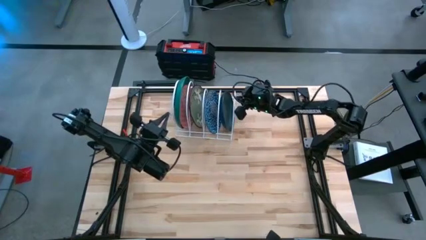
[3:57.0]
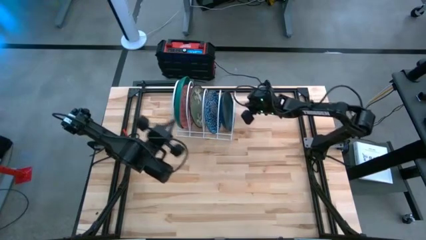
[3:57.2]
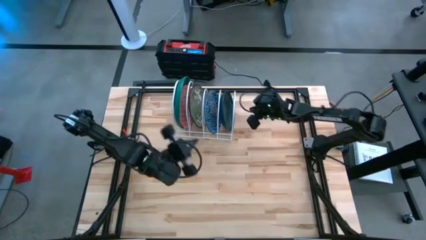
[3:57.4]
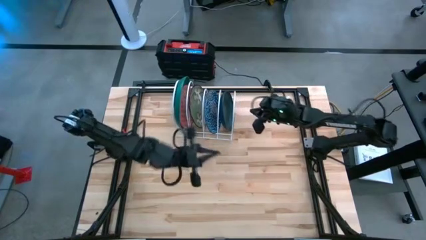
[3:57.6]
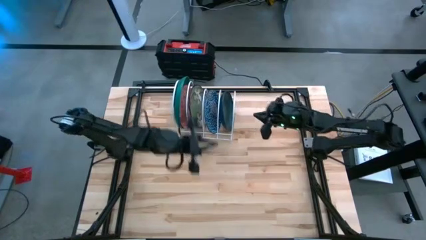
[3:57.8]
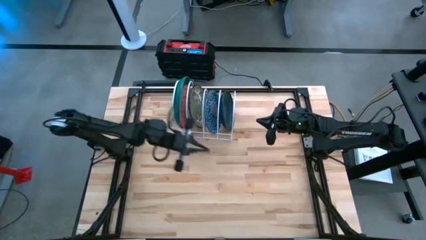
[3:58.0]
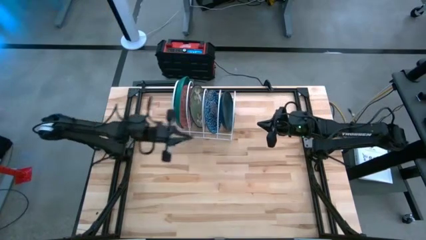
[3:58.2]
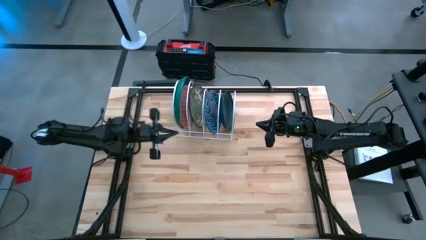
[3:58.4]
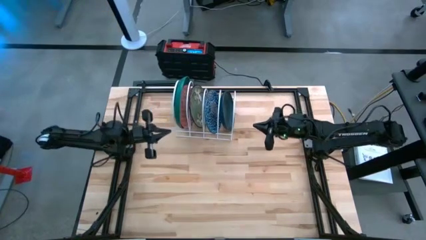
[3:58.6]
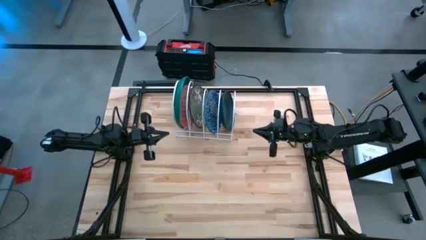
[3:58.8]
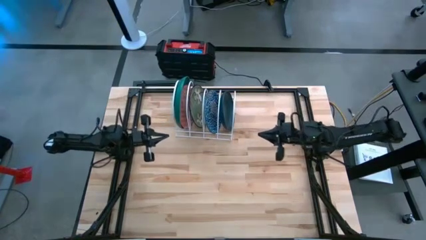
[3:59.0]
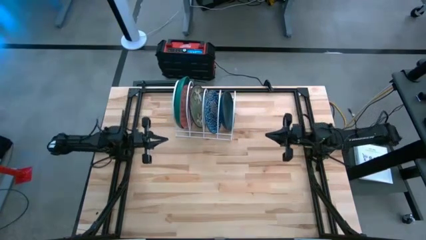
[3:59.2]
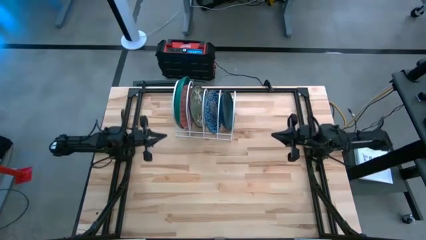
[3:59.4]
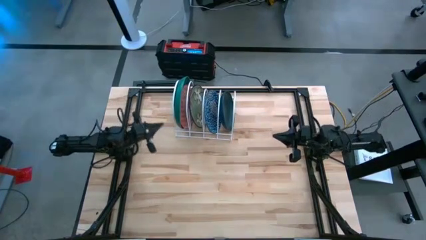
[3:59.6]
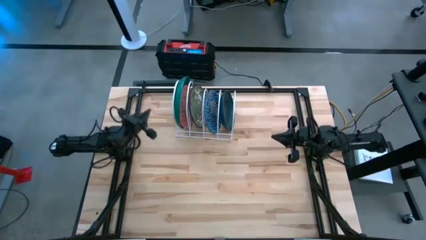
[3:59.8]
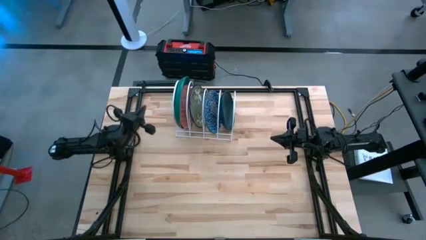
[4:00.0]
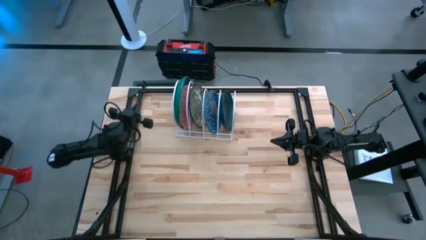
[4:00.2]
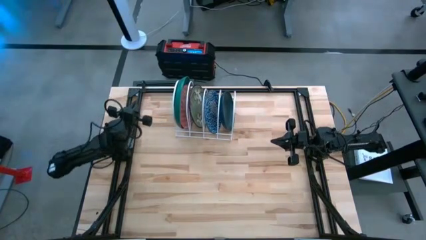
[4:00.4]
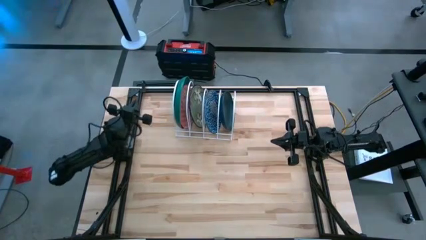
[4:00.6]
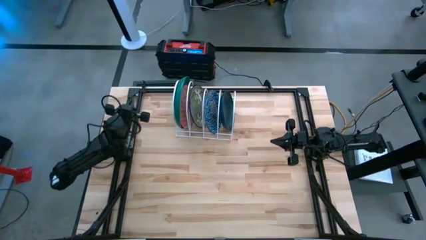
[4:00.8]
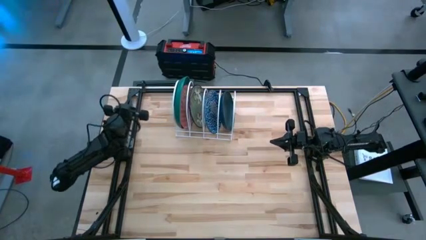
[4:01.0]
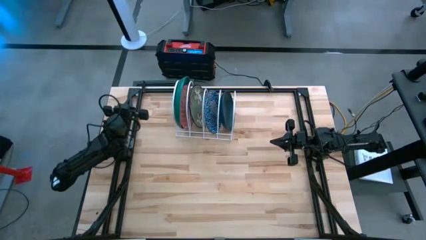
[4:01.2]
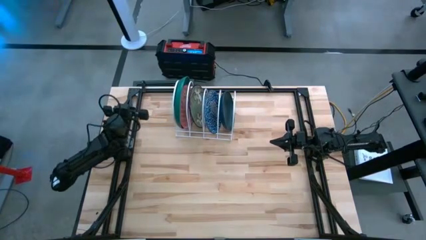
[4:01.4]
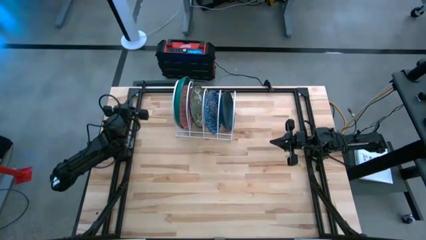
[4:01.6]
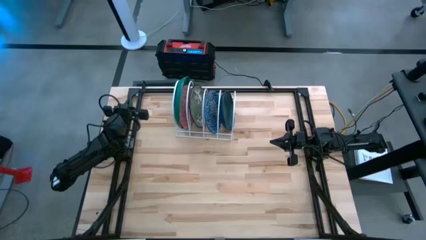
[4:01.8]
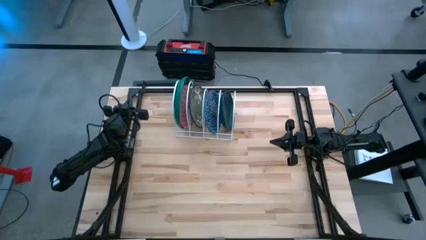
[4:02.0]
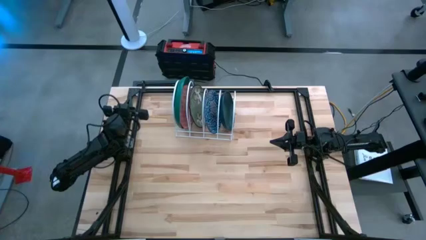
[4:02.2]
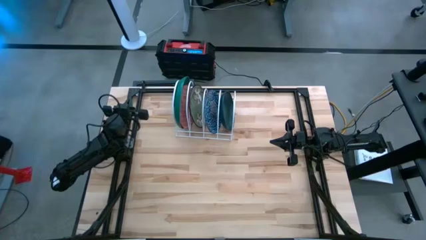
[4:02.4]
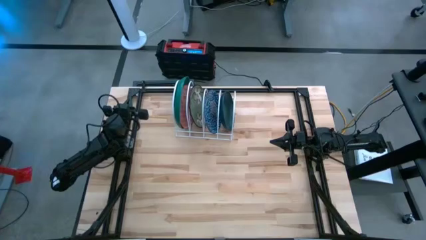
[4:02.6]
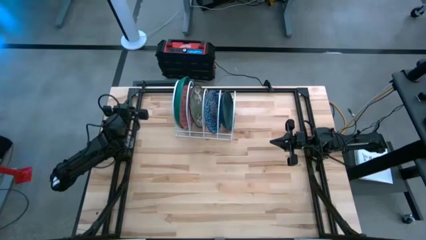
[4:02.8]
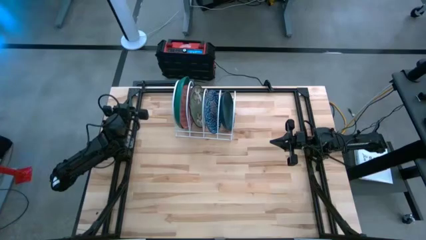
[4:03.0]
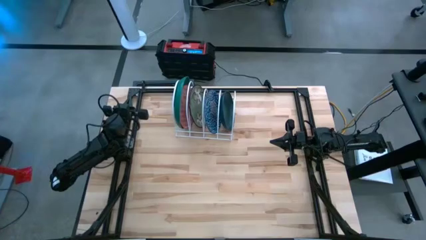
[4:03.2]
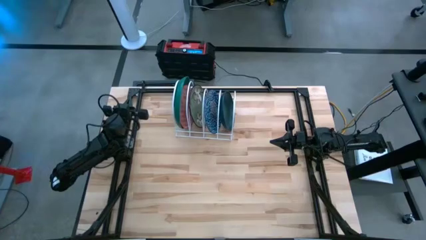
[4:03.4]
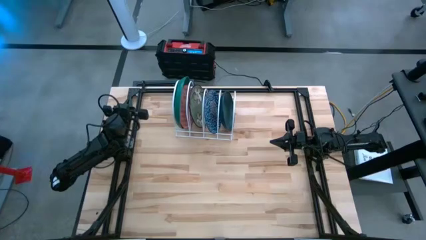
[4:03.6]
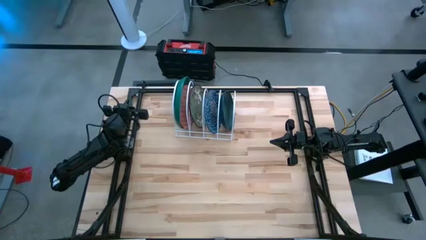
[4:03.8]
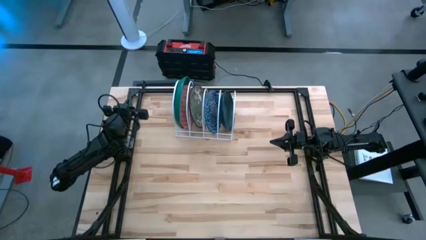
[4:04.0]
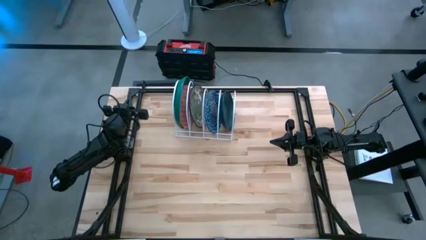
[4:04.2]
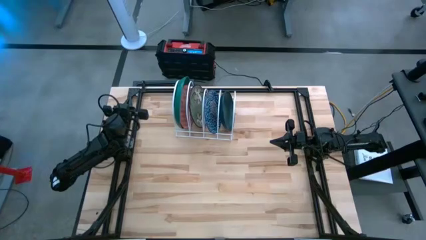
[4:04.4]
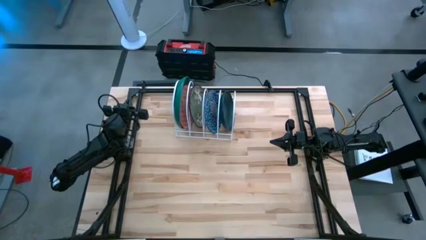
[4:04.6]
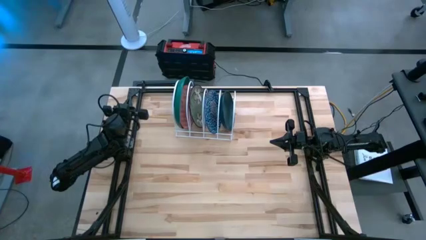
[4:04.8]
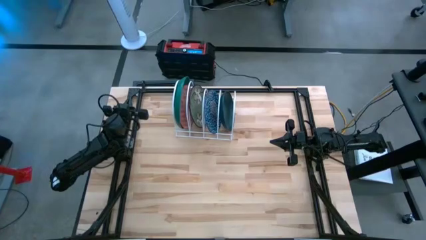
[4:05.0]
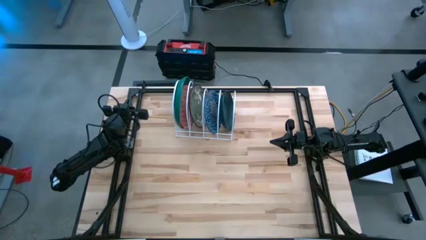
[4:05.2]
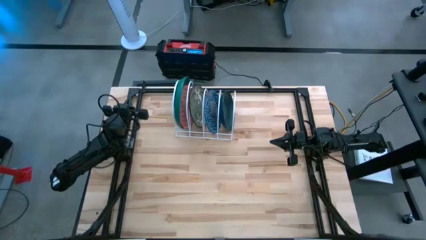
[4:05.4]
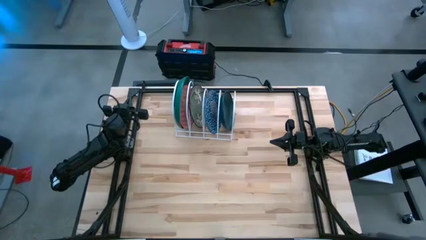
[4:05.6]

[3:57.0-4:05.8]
Task: Sort dishes
Return to Home Position

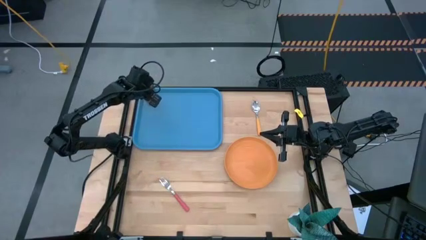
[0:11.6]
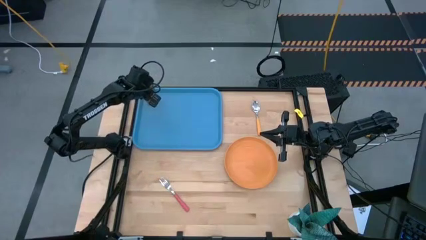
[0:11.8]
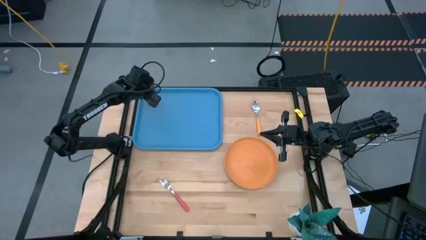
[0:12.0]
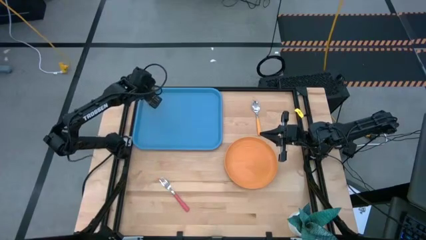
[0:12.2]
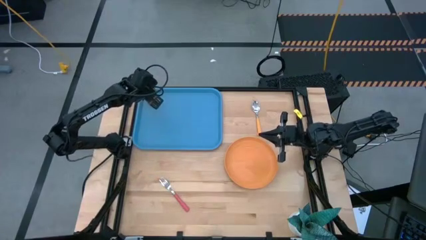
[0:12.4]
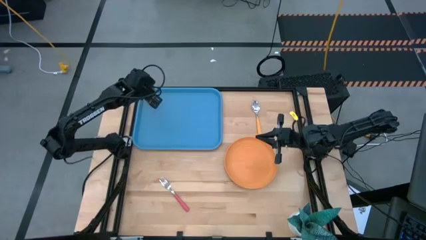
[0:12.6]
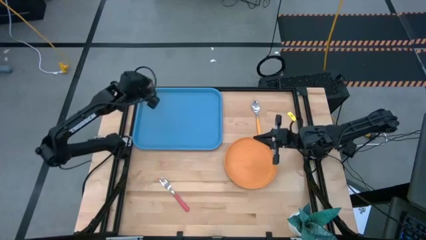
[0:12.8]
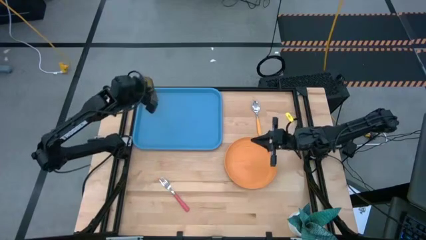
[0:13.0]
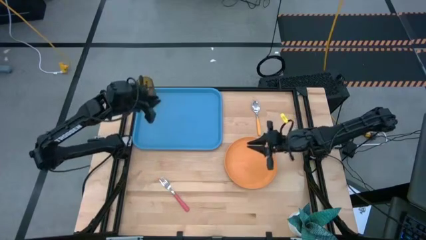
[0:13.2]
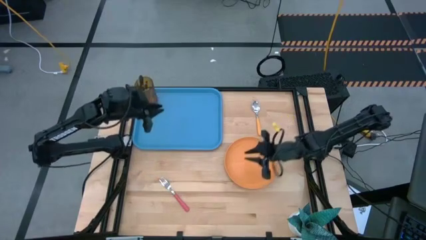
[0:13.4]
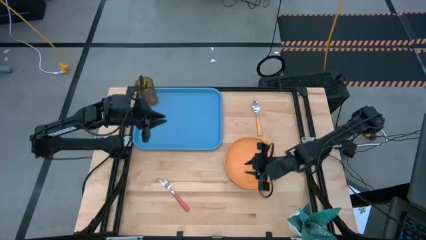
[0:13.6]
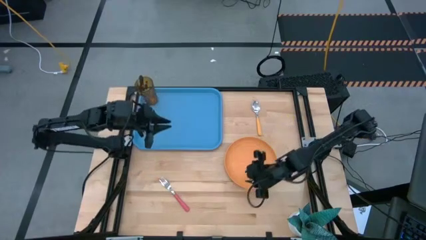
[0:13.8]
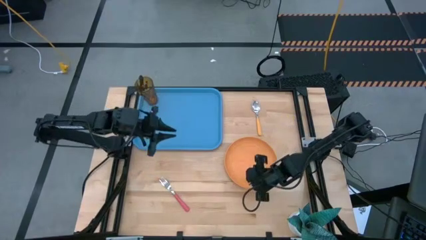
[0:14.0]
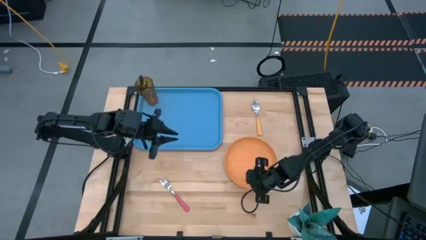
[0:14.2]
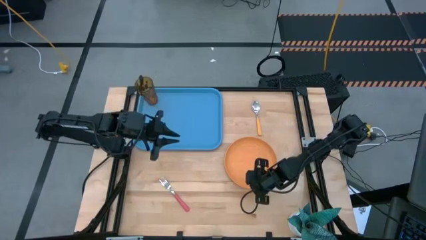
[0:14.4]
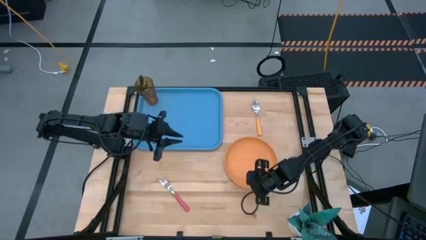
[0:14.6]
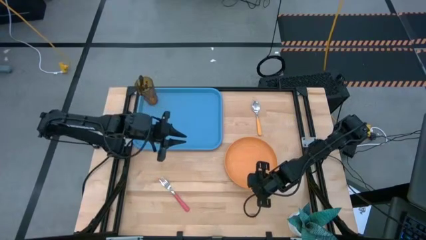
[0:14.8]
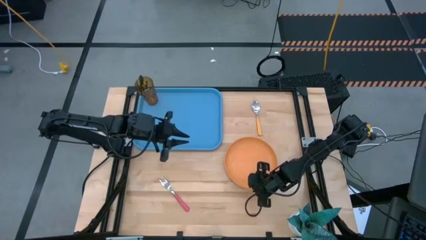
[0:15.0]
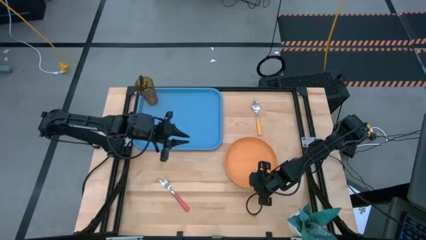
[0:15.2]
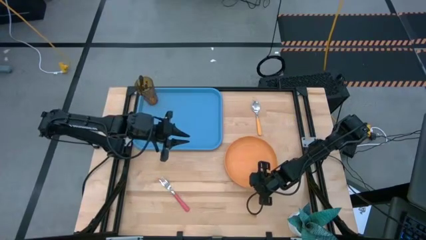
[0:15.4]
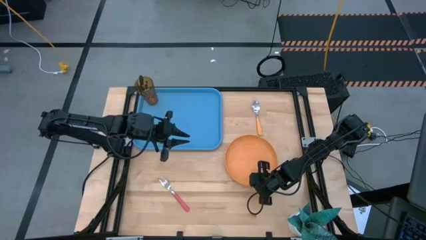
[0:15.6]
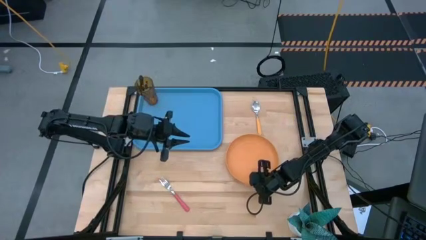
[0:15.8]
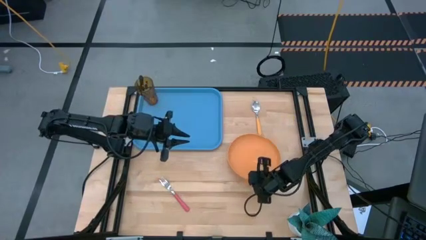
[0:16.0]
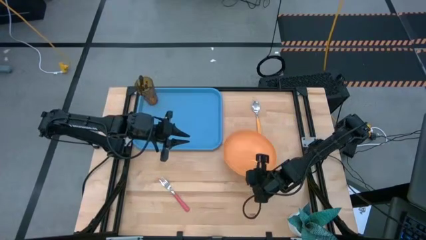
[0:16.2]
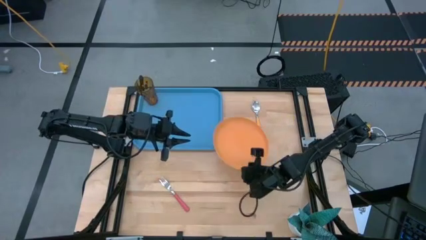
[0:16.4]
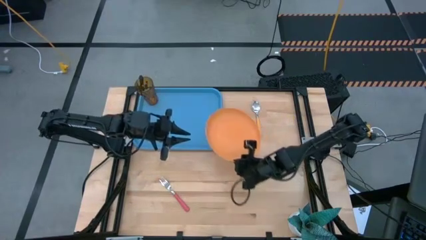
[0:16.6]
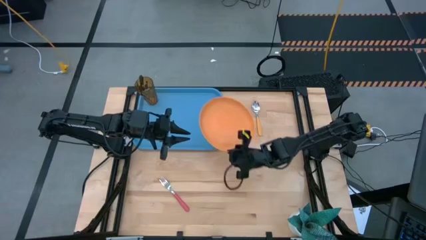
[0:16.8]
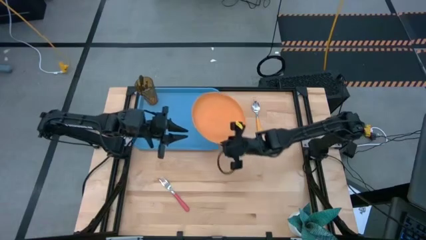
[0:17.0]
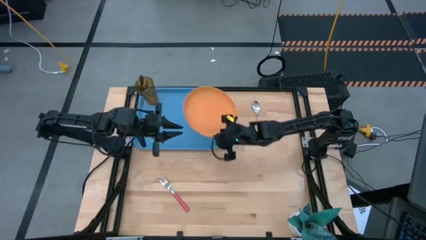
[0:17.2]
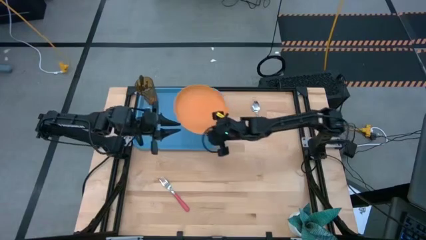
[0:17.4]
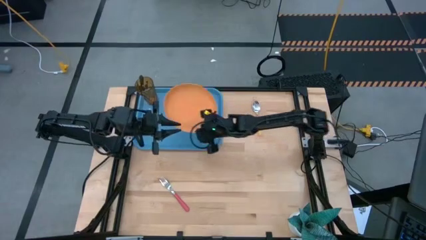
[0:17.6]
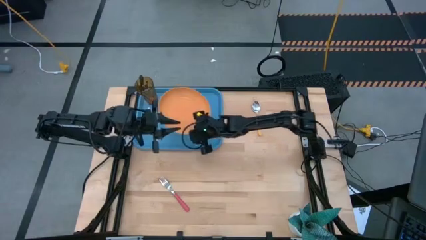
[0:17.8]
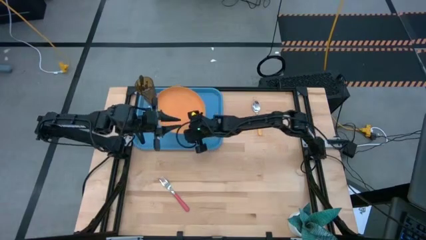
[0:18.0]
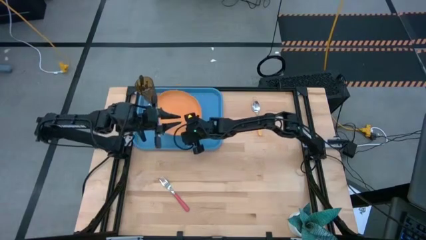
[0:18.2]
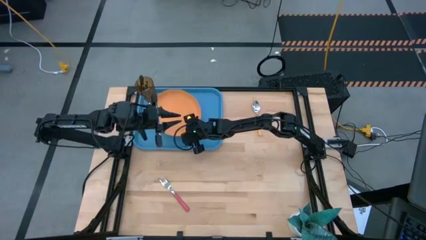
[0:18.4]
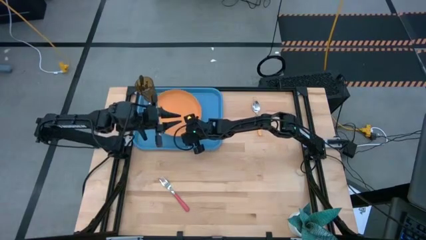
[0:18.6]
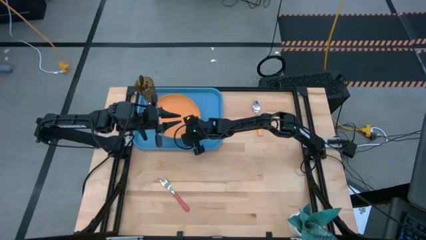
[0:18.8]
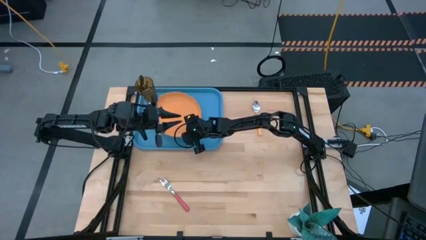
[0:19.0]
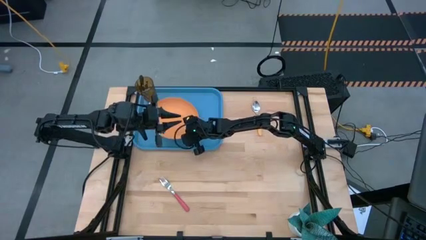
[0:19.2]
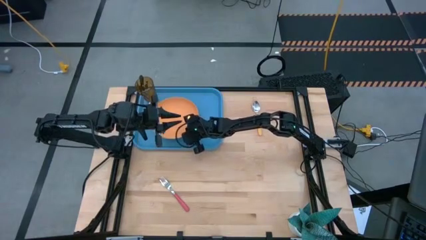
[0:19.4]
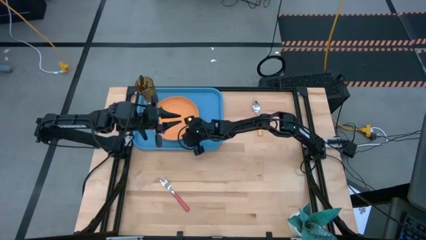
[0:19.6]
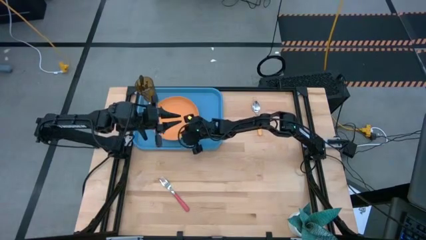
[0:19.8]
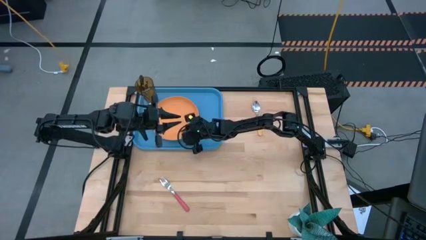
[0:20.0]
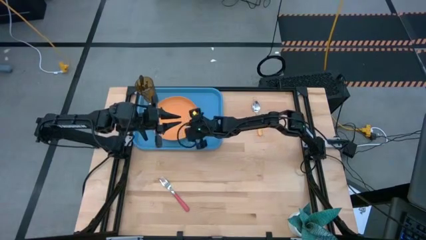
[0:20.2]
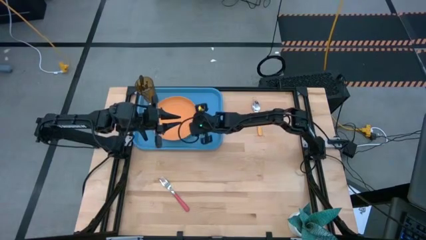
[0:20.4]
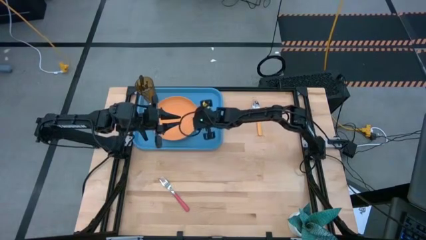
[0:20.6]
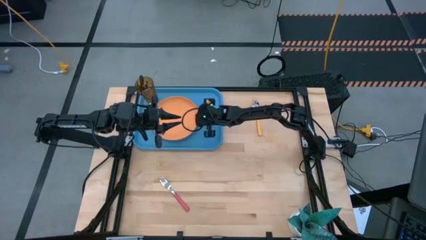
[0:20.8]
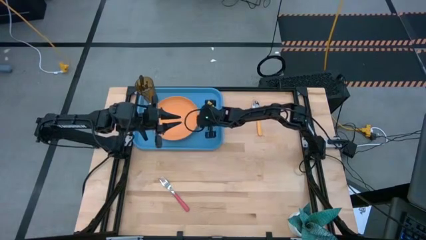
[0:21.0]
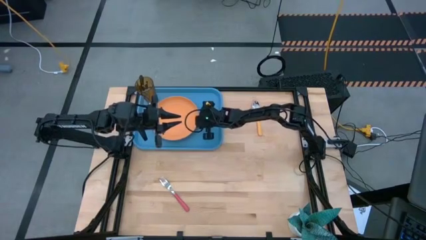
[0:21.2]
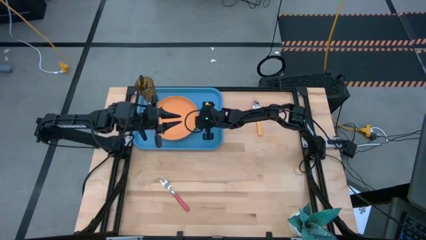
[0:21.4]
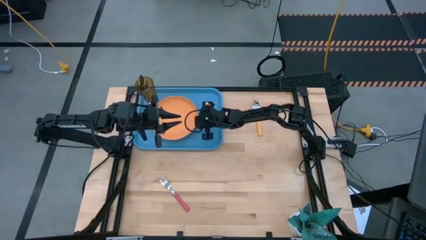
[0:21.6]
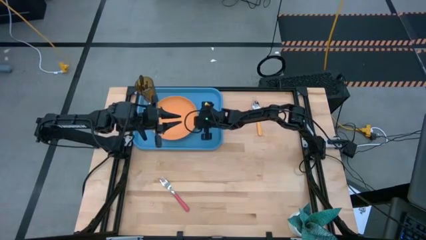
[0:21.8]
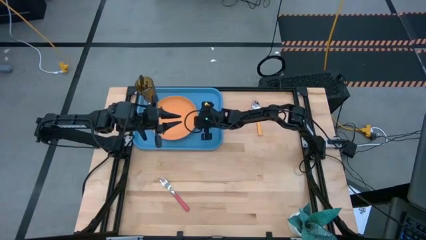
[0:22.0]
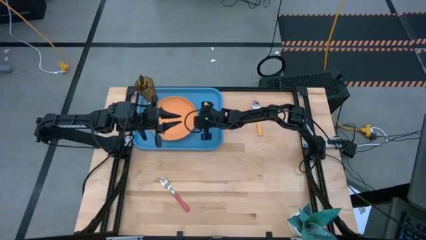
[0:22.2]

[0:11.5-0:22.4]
Task: Pick and place plate/cup/fork/spoon on tray
Put the orange plate on the blue tray
